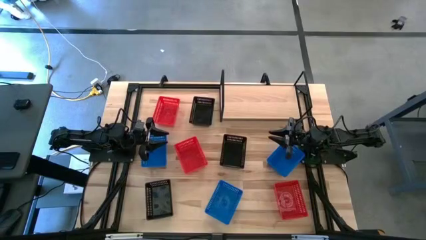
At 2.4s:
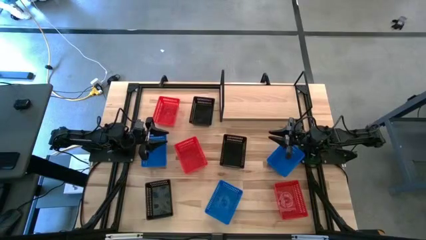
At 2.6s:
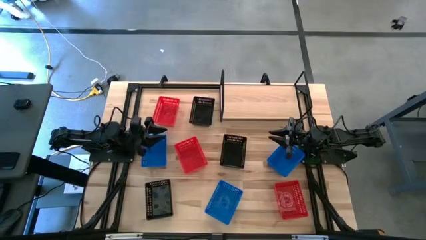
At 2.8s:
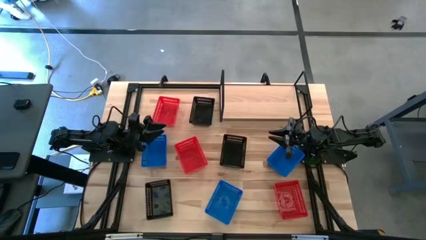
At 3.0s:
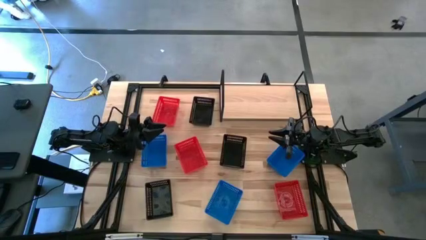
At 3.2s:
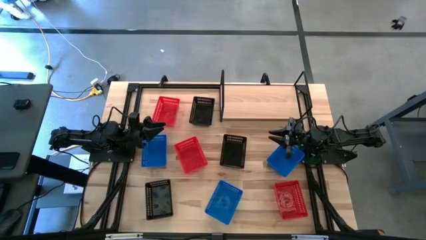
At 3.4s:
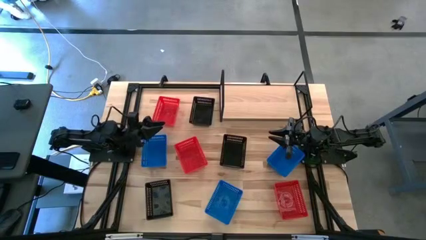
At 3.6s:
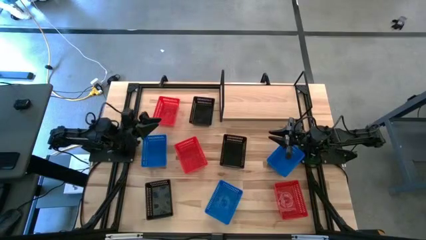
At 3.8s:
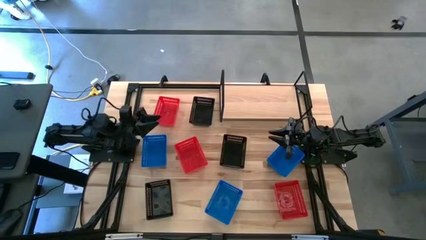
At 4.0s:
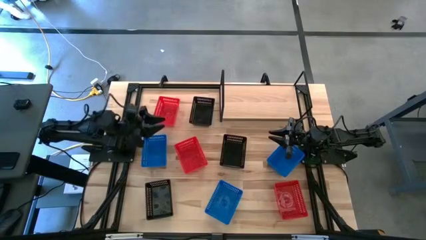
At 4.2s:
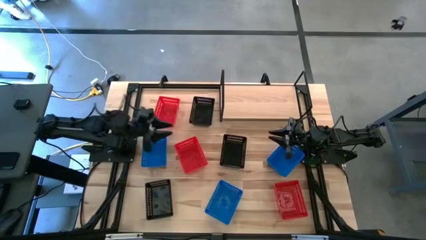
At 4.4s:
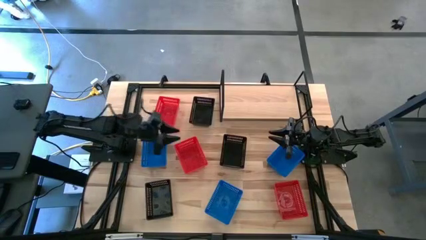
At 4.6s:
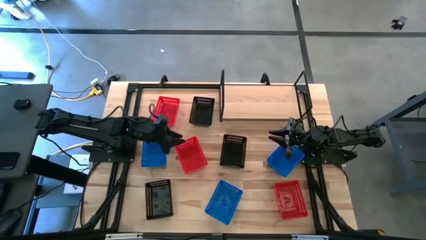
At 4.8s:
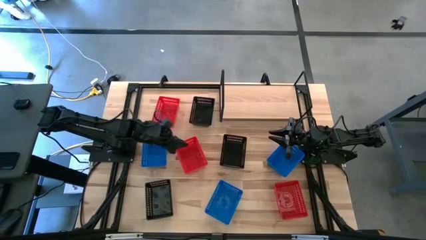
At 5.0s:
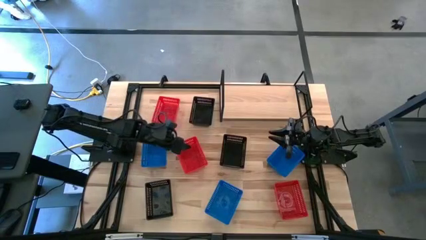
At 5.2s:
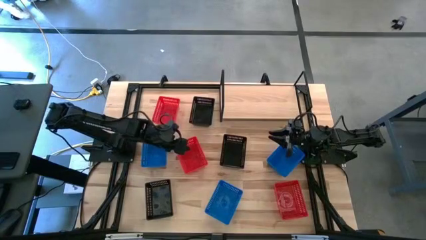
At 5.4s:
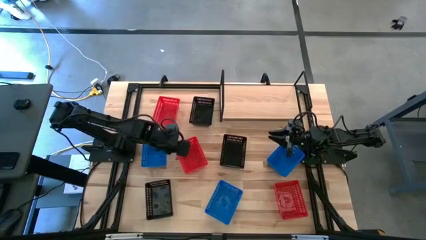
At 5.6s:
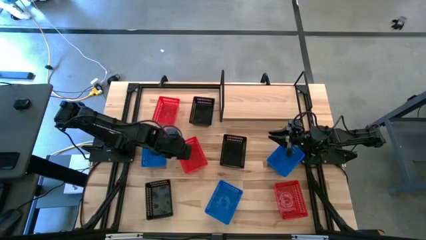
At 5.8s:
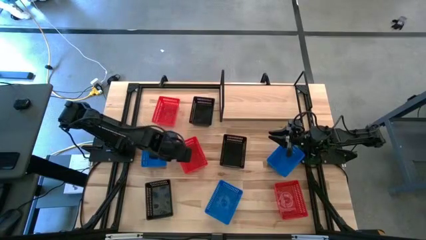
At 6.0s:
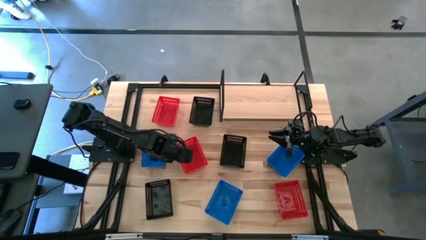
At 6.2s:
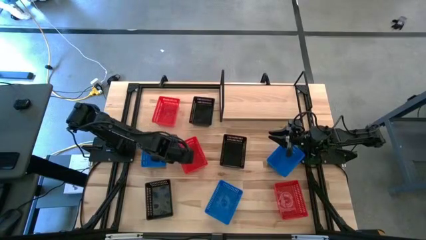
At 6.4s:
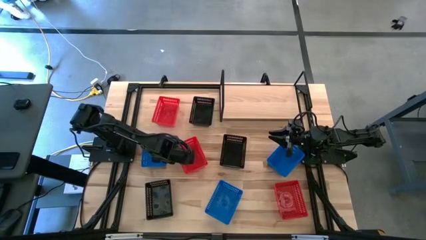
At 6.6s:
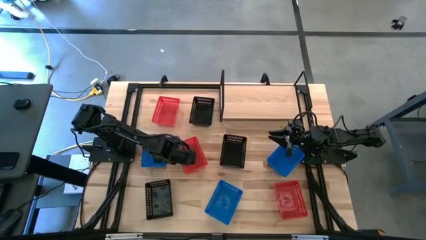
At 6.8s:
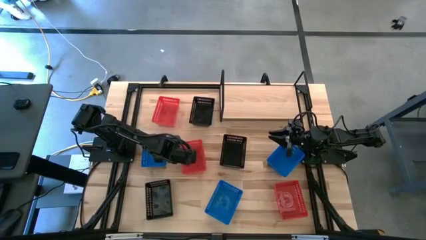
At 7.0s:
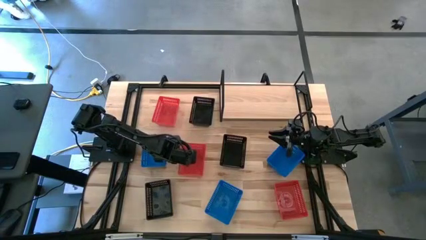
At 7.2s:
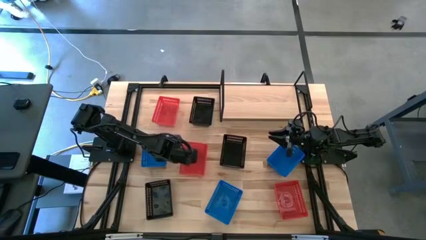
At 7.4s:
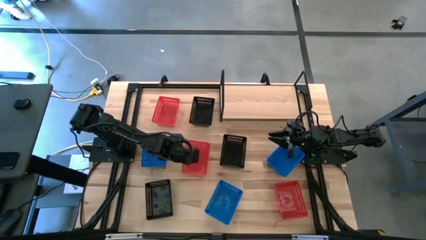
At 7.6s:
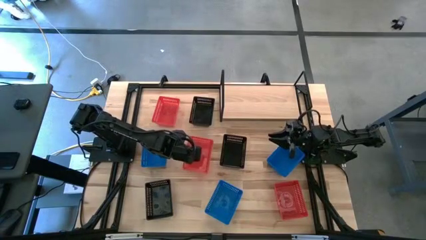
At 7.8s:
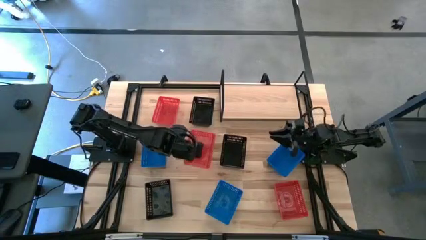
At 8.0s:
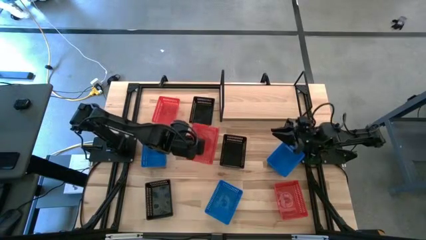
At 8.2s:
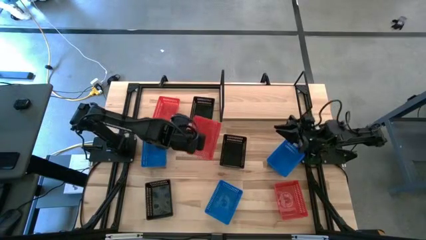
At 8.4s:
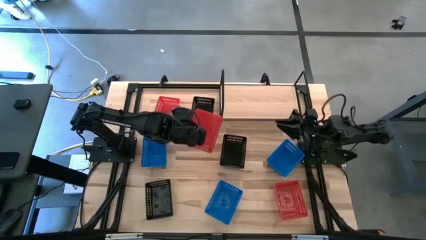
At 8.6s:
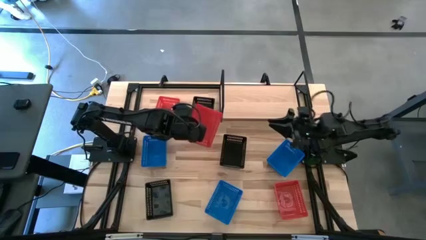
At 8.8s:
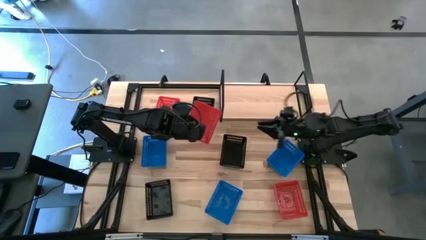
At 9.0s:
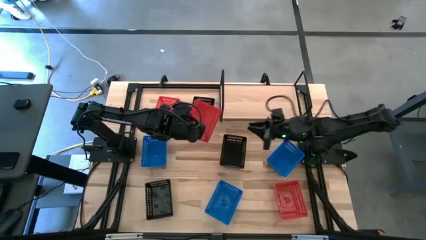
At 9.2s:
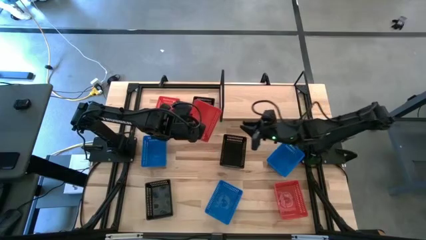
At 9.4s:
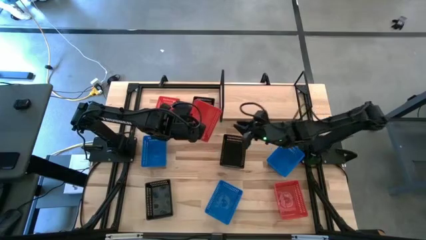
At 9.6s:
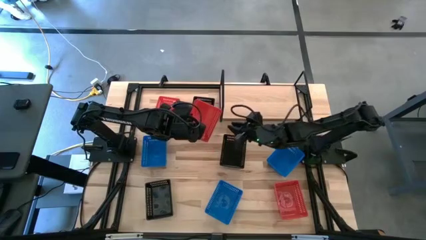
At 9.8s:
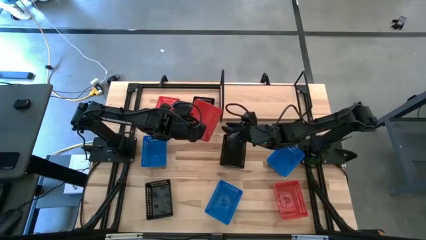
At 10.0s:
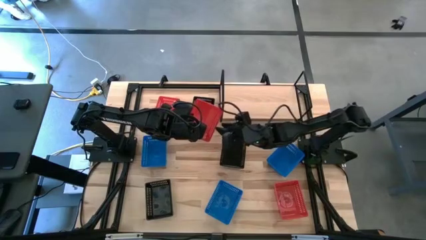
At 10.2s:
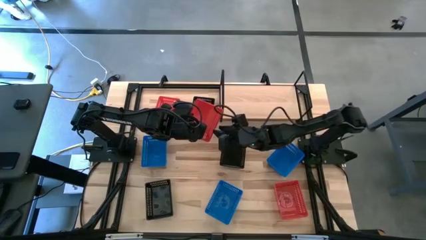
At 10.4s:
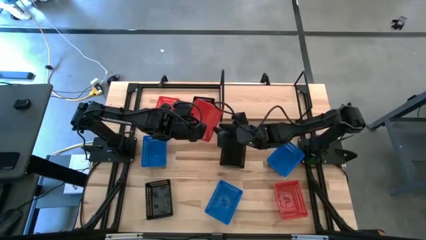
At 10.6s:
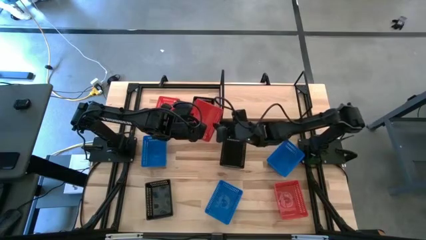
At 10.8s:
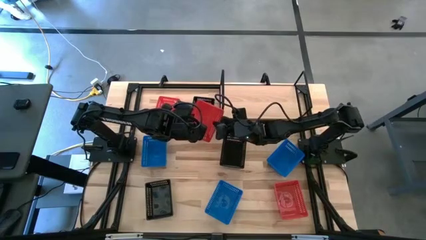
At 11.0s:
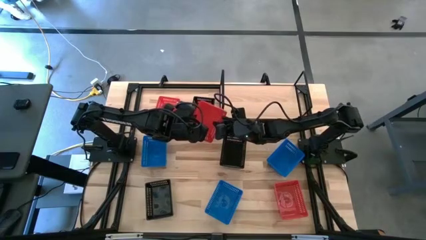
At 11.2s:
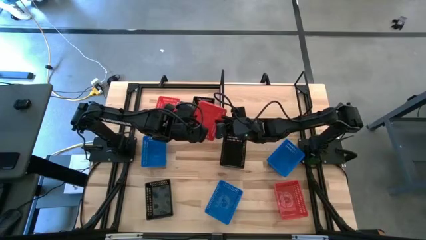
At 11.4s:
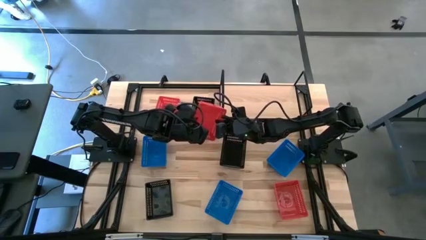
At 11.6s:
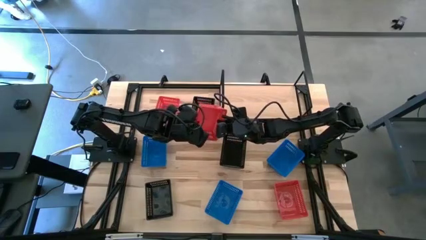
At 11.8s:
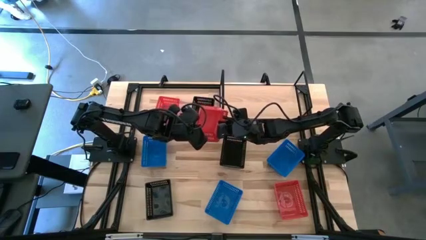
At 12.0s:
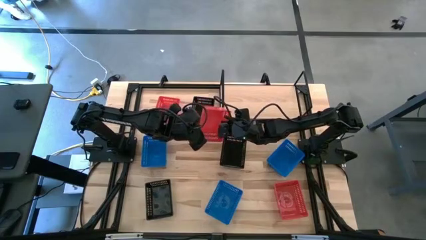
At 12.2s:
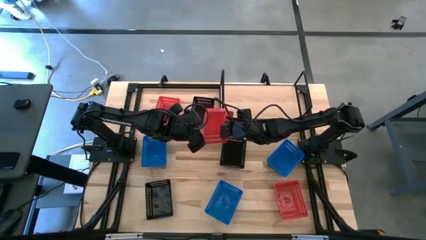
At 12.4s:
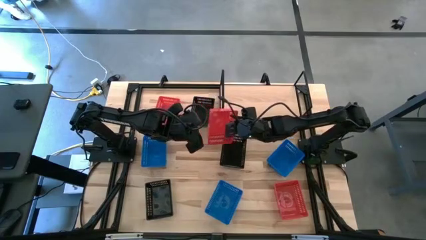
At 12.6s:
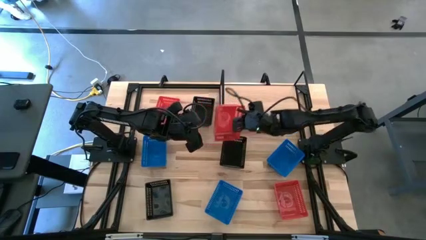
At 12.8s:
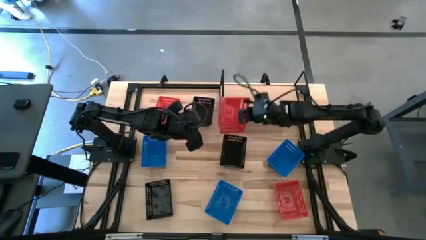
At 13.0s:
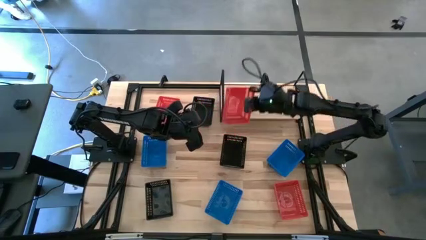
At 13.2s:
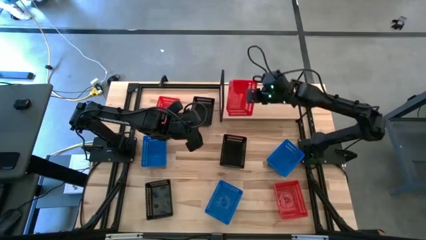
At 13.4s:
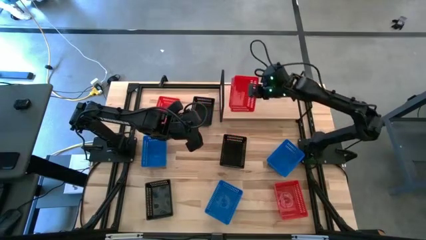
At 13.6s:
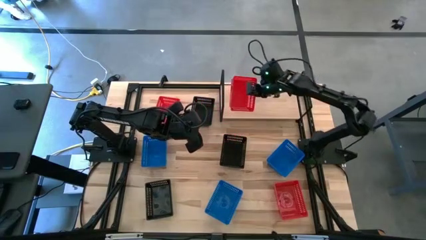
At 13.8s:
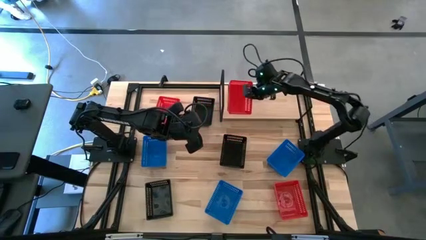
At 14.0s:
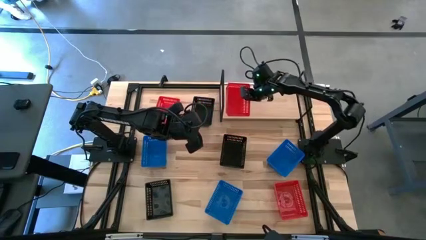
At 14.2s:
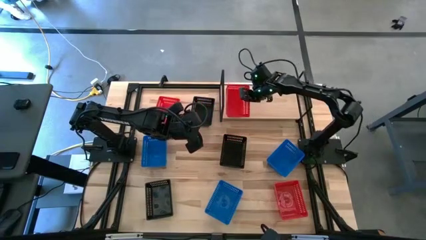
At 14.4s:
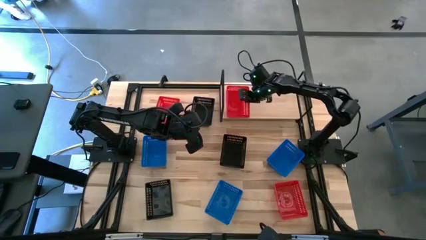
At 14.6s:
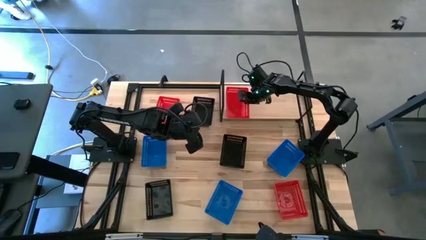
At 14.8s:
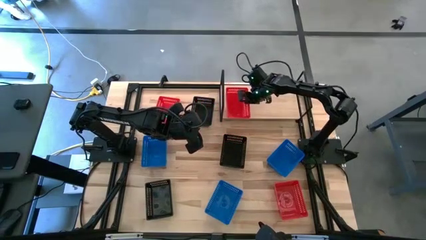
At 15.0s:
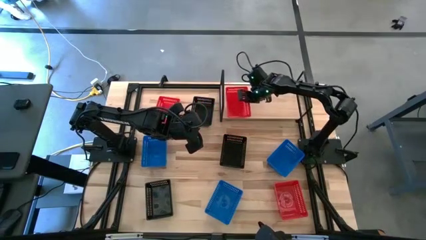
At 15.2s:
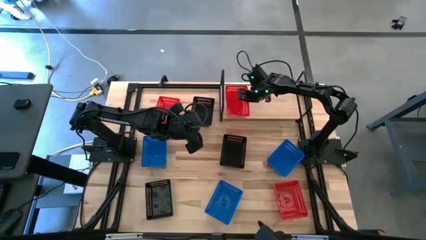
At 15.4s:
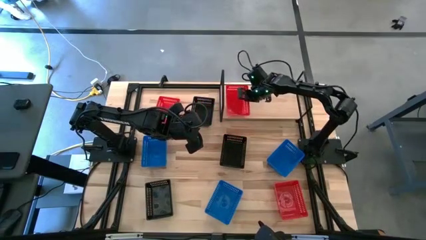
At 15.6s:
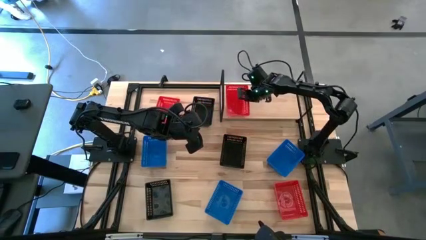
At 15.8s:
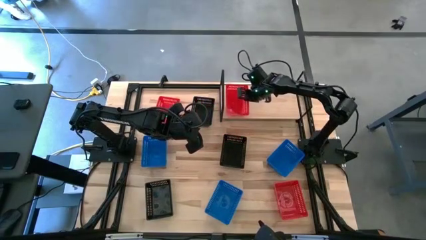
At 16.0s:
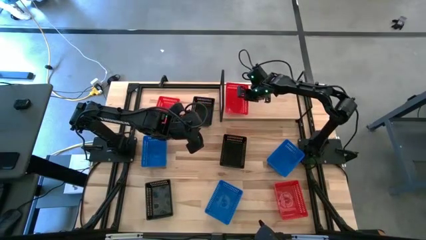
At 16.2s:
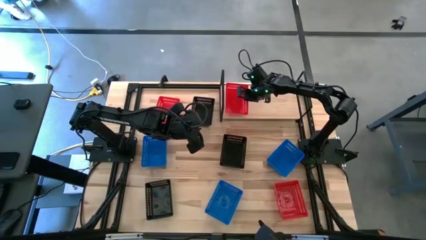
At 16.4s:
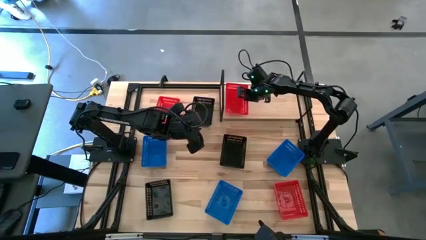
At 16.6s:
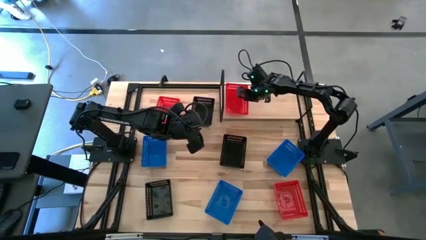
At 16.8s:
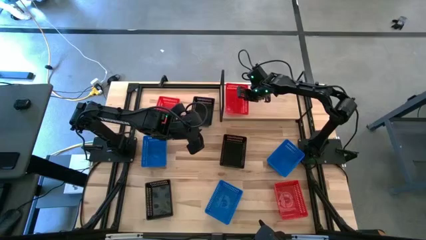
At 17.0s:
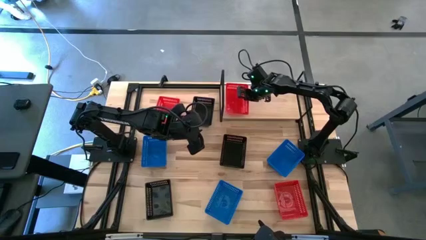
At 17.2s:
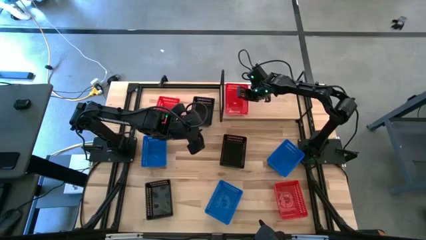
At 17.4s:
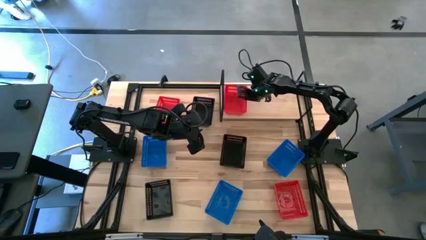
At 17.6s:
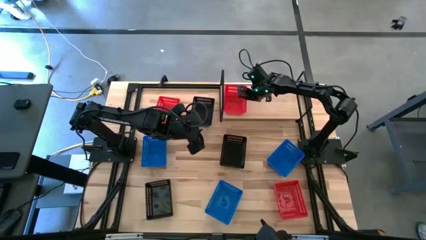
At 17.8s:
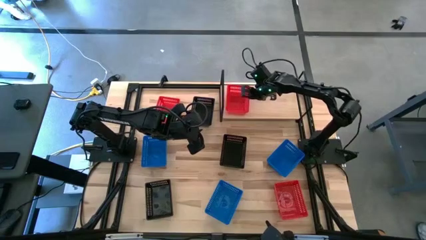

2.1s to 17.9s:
Task: Stack baskets on shelf by color
Put the middle red bin on the shelf
